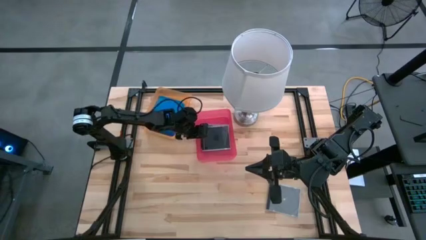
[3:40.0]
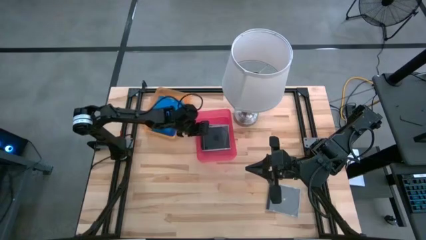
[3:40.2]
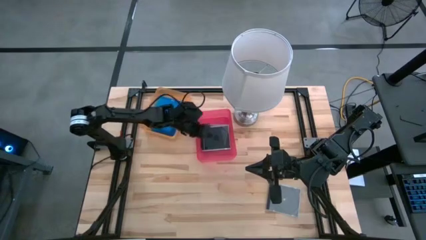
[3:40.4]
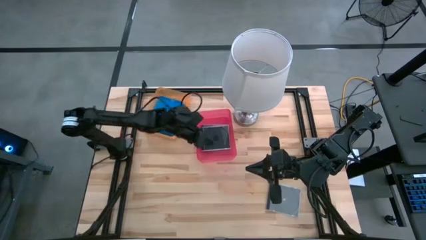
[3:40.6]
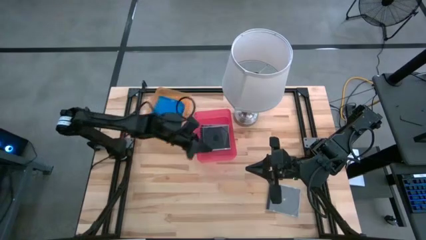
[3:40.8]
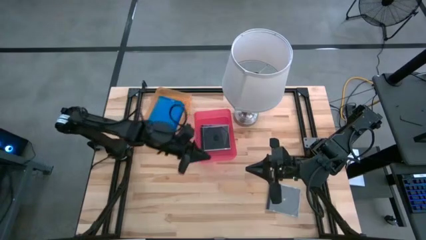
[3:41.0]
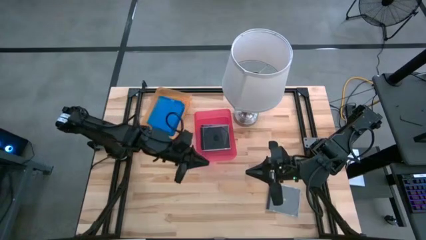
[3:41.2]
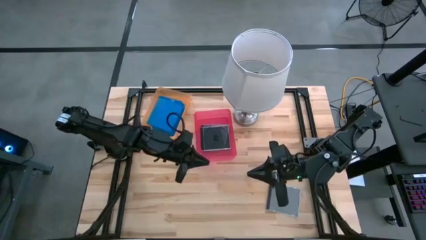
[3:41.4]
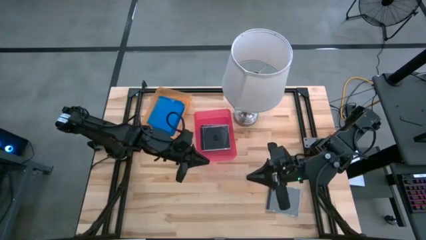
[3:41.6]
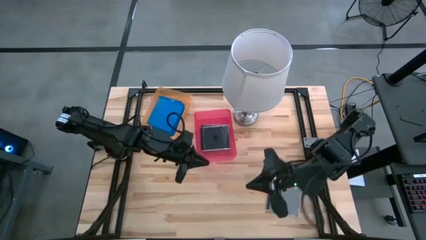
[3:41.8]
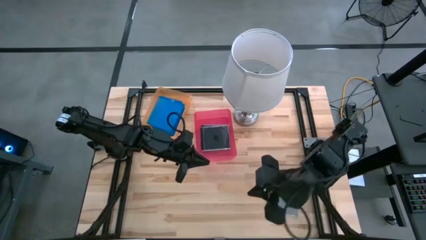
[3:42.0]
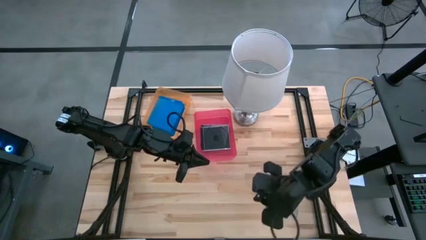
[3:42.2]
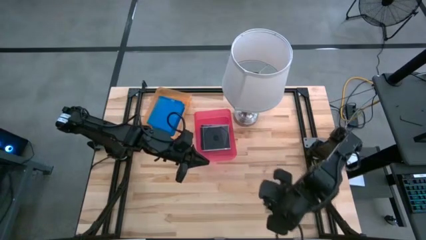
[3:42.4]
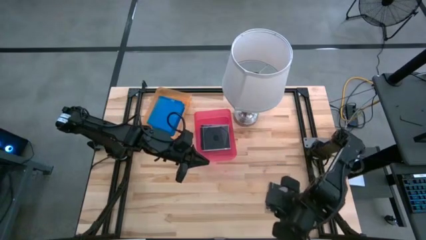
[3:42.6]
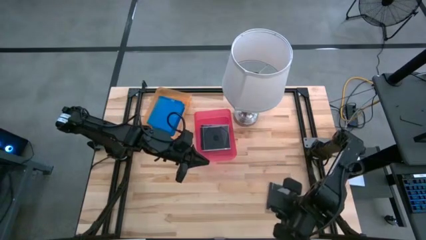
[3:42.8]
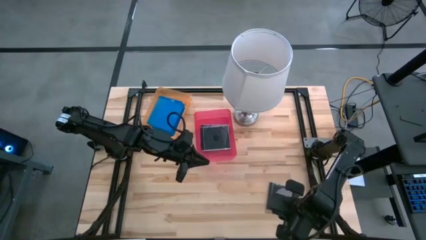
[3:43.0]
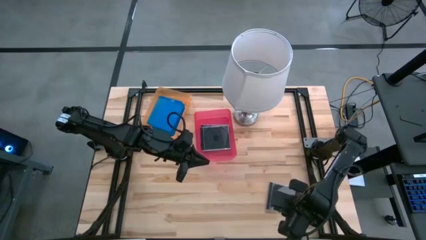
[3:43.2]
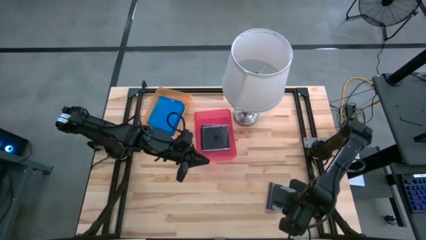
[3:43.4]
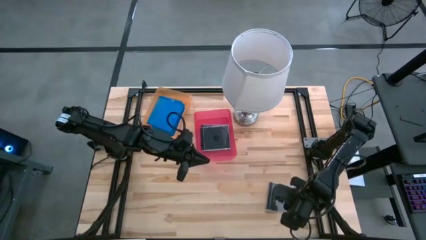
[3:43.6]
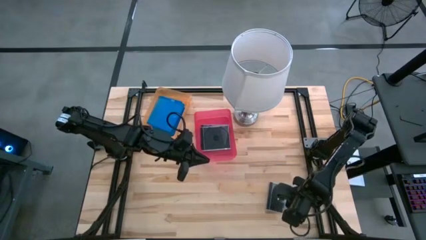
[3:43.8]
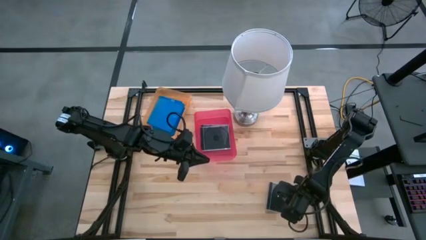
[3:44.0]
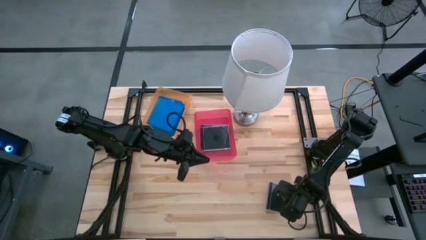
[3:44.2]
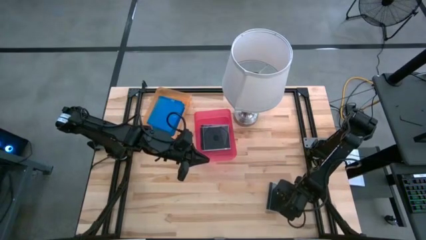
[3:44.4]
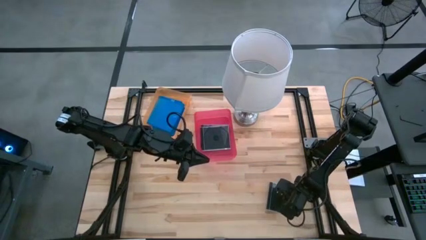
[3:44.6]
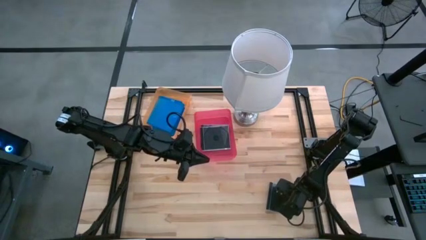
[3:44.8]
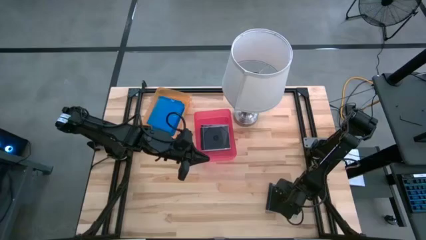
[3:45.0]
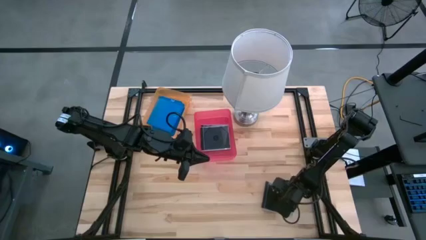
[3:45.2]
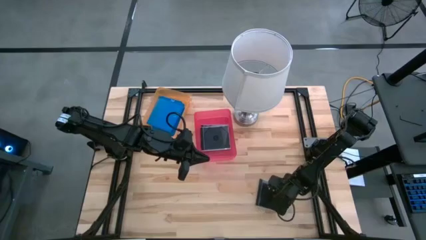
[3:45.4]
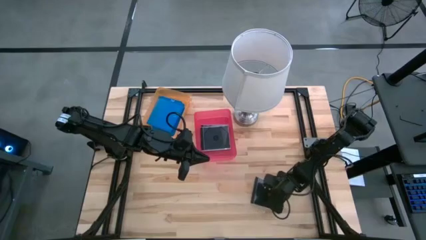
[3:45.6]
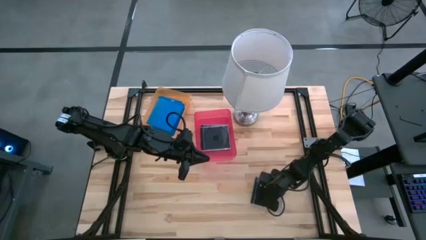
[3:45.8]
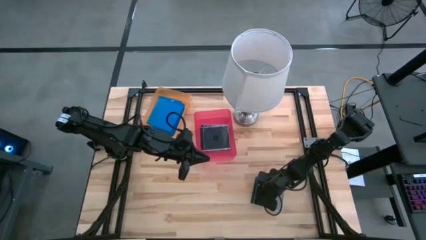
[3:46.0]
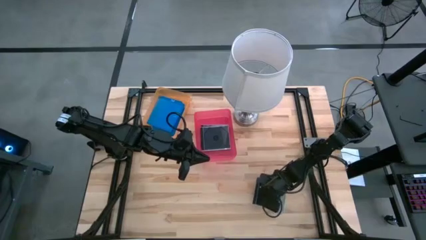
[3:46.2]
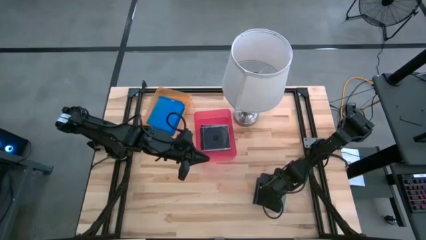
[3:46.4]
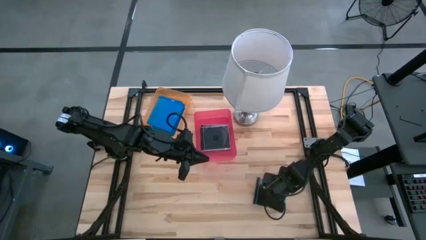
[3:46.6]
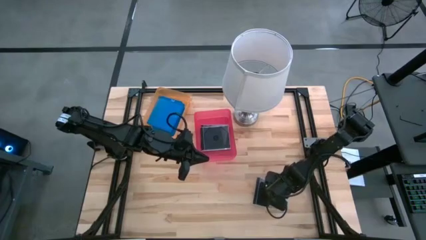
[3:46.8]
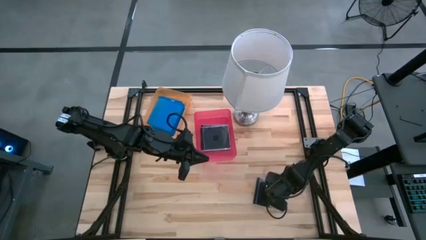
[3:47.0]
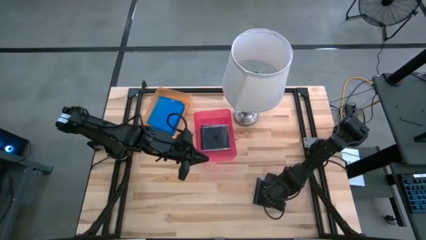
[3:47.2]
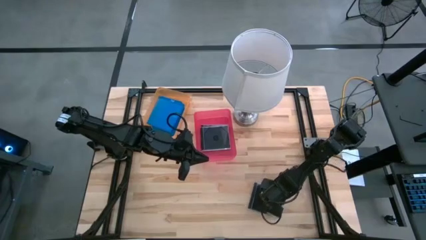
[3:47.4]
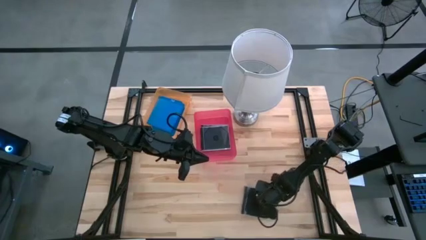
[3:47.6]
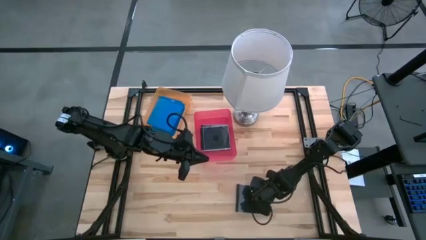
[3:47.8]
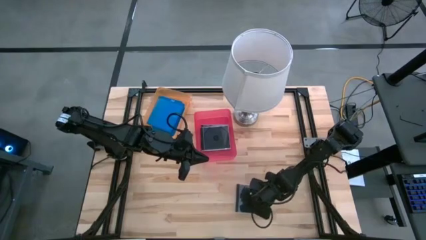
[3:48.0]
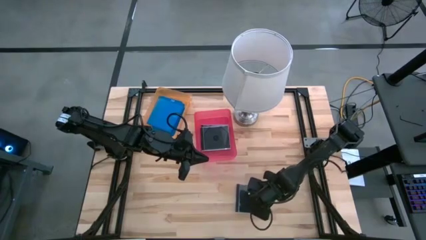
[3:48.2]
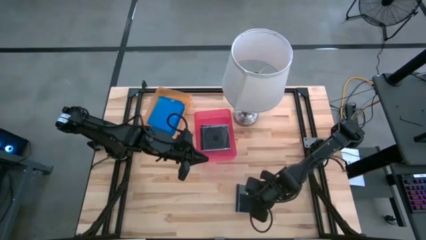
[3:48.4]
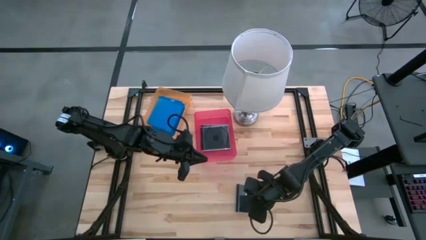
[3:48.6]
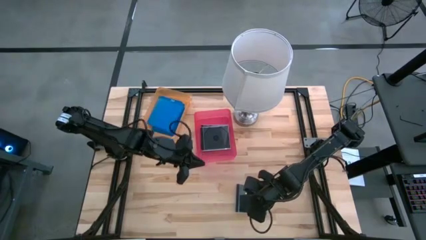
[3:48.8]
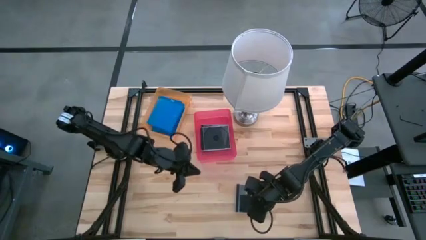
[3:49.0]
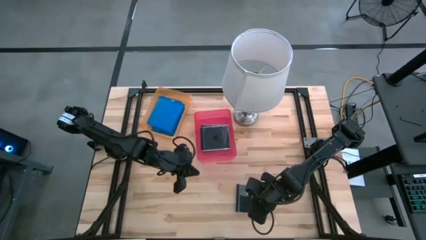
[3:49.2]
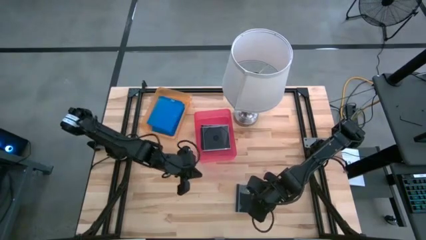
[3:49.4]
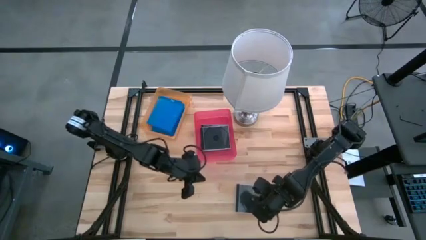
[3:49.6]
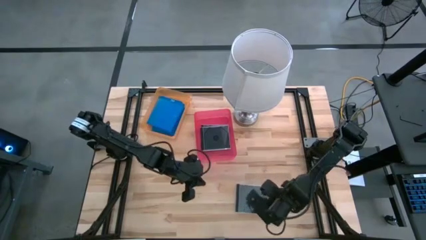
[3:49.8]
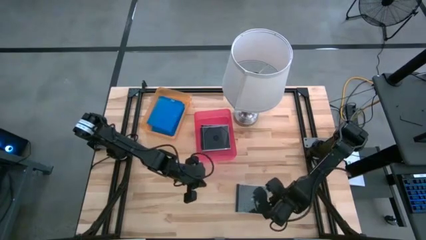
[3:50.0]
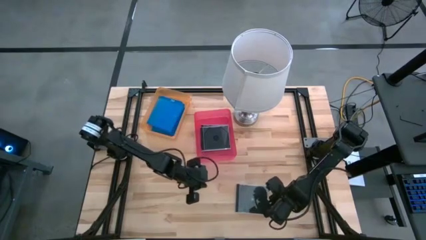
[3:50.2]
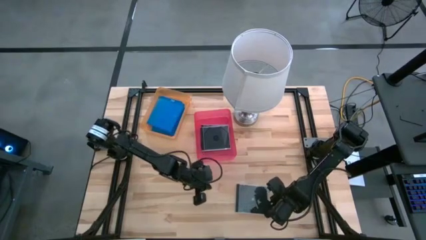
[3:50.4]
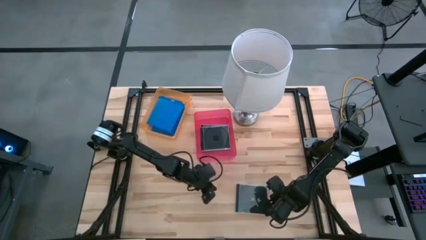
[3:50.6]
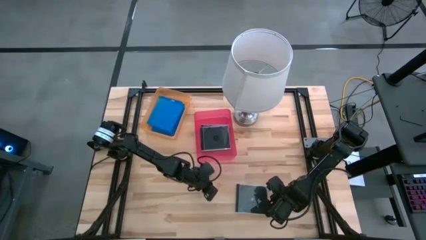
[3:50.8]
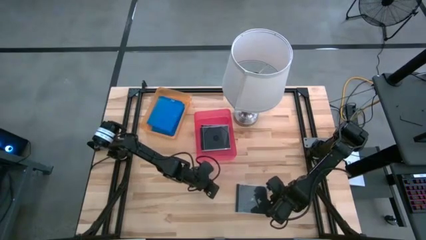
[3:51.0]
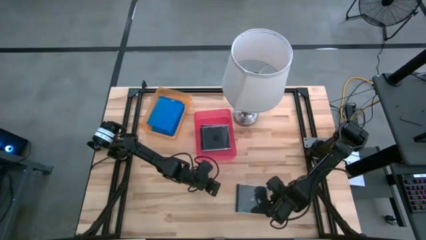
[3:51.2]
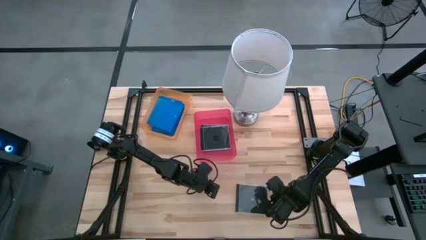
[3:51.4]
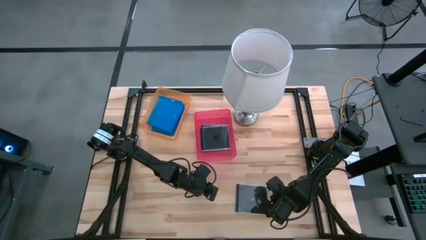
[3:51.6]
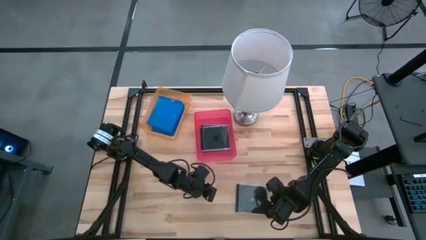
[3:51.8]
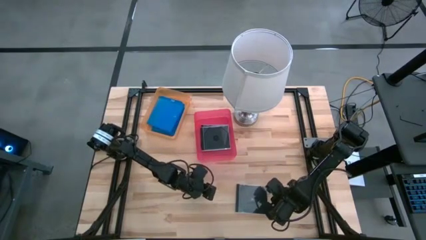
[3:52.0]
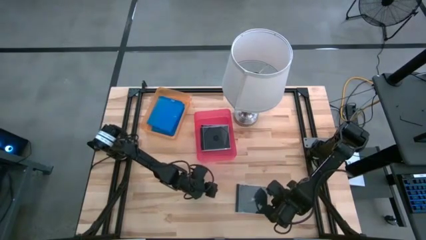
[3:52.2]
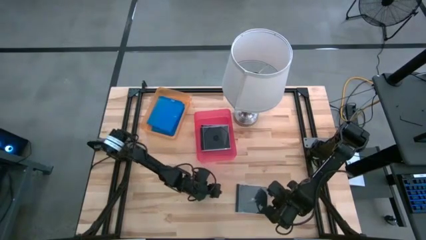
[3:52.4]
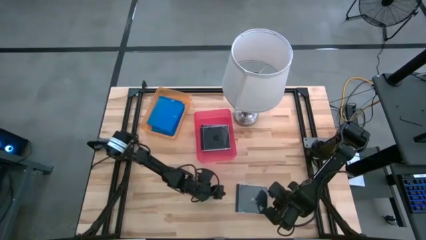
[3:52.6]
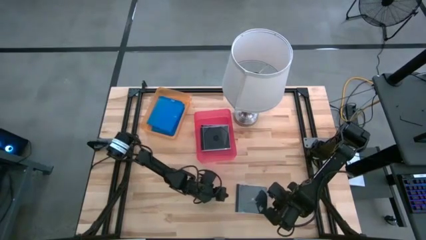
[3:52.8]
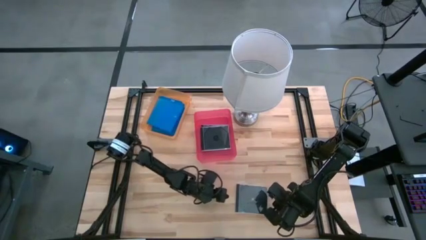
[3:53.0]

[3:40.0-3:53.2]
Task: Pick & place jewel cases by type
Put the black cd case into the pink bin
